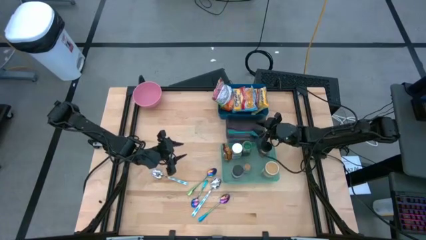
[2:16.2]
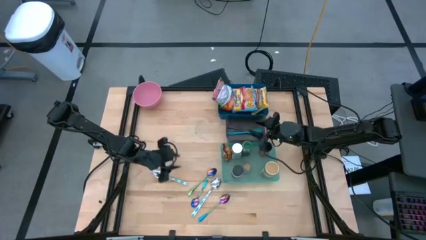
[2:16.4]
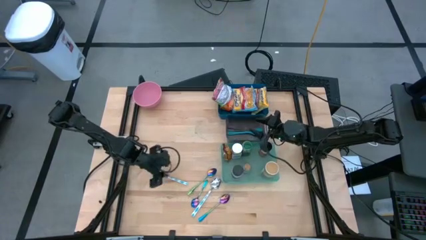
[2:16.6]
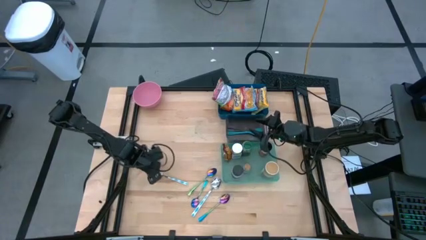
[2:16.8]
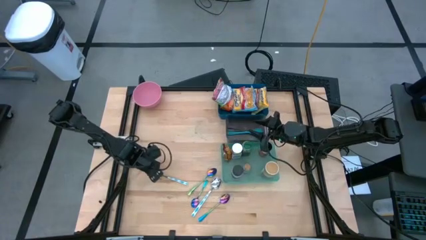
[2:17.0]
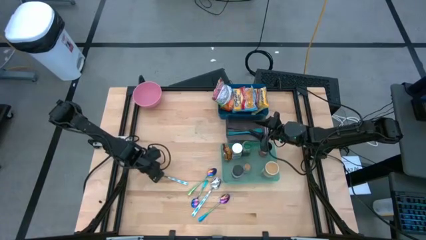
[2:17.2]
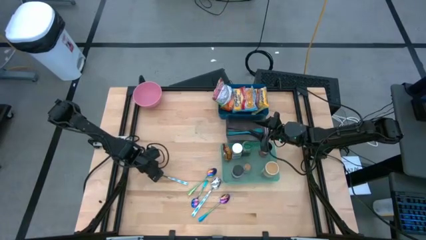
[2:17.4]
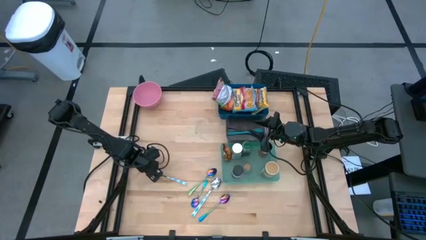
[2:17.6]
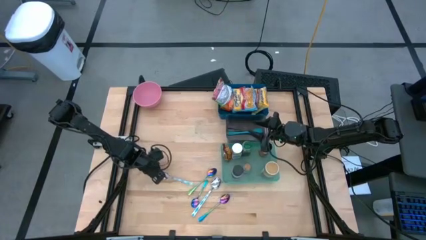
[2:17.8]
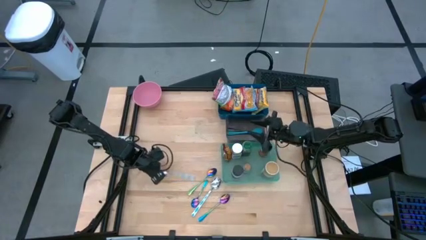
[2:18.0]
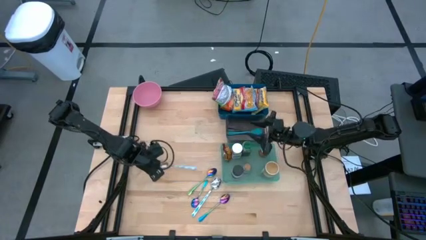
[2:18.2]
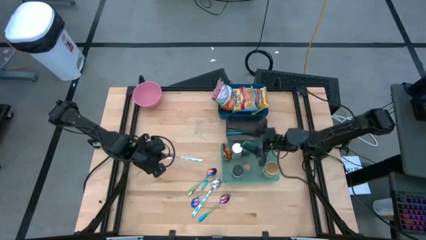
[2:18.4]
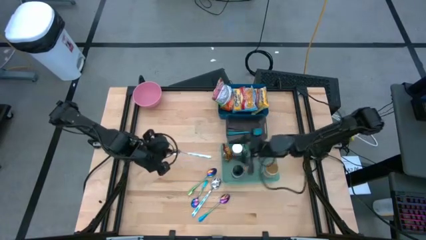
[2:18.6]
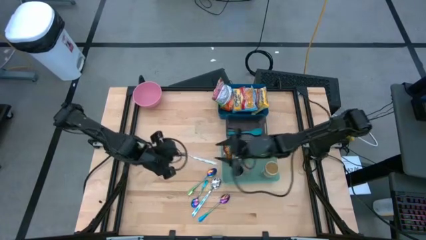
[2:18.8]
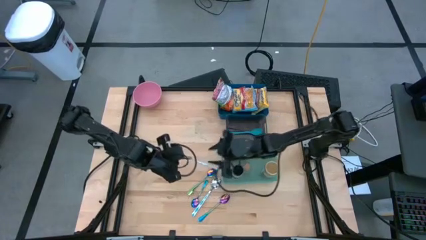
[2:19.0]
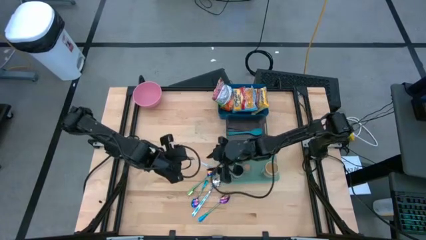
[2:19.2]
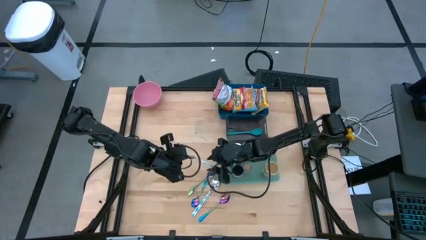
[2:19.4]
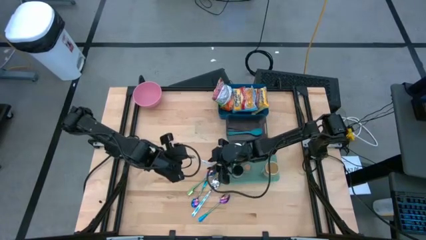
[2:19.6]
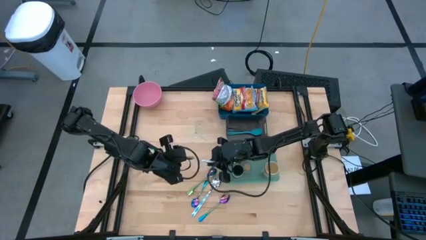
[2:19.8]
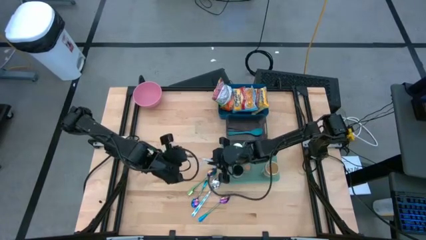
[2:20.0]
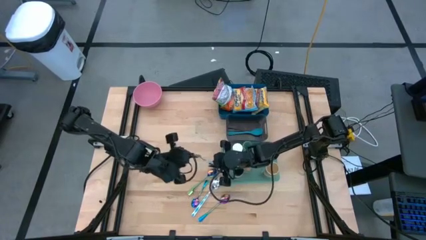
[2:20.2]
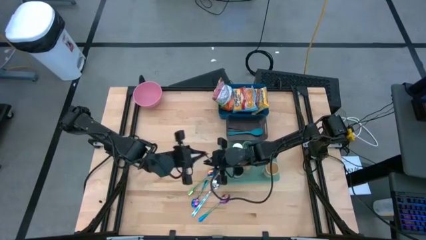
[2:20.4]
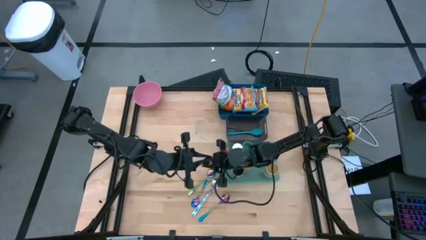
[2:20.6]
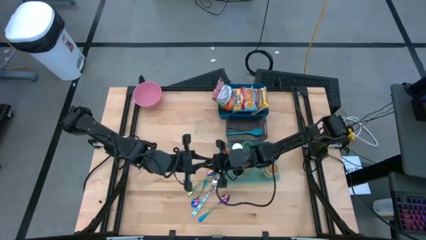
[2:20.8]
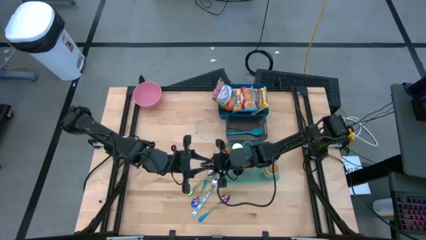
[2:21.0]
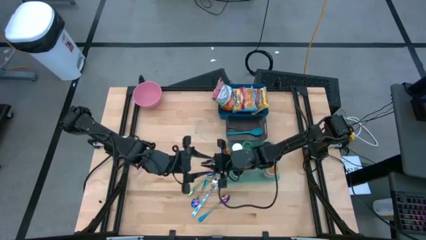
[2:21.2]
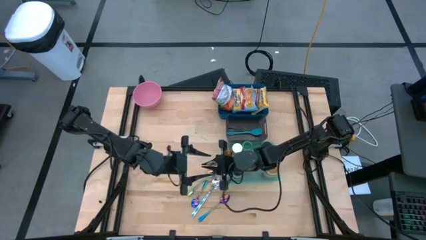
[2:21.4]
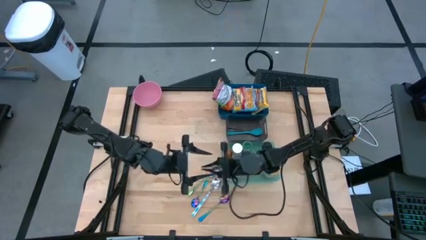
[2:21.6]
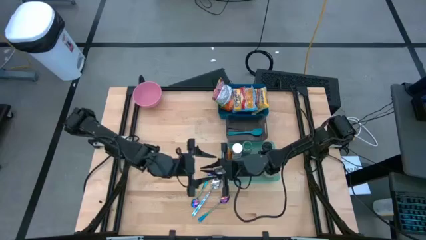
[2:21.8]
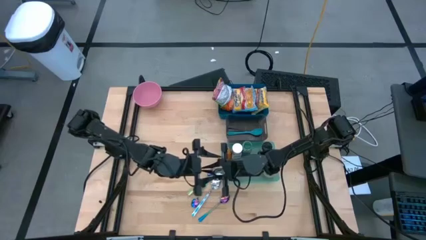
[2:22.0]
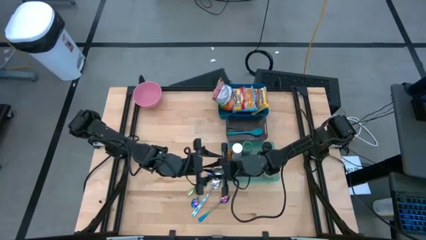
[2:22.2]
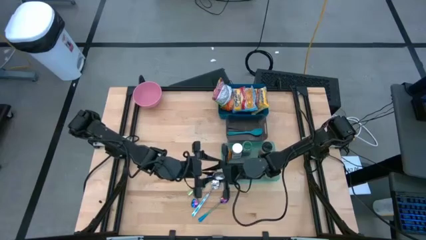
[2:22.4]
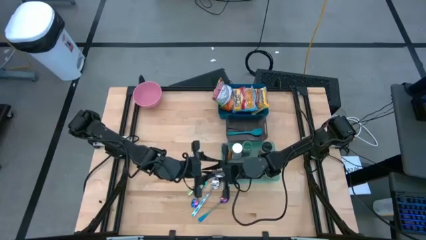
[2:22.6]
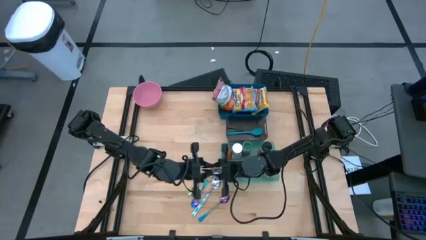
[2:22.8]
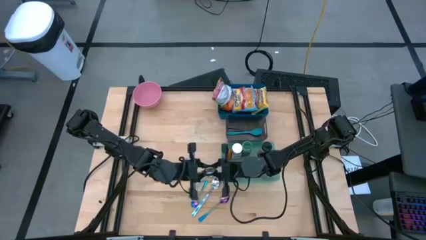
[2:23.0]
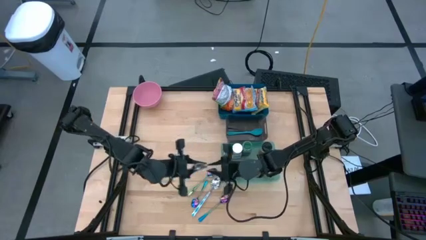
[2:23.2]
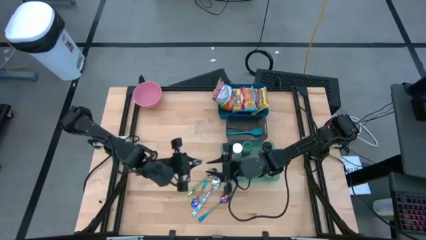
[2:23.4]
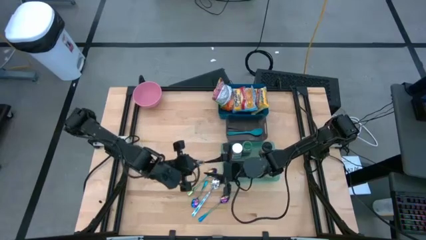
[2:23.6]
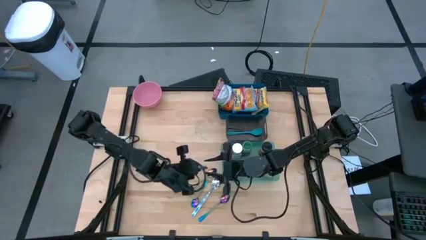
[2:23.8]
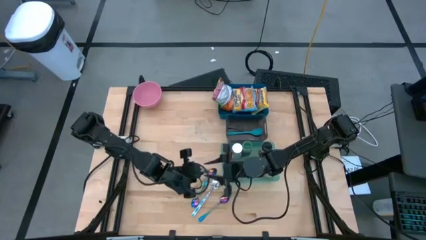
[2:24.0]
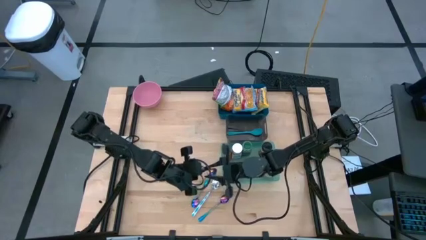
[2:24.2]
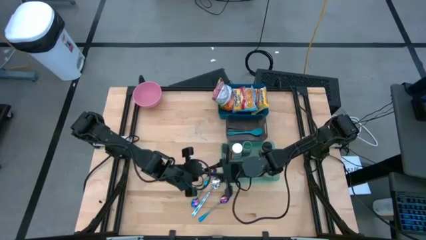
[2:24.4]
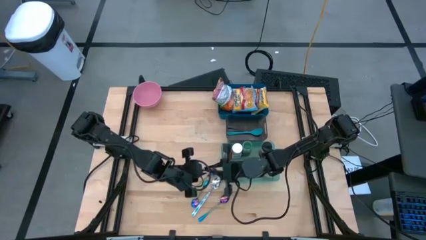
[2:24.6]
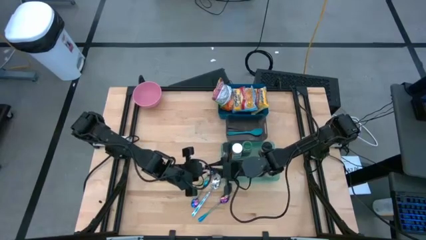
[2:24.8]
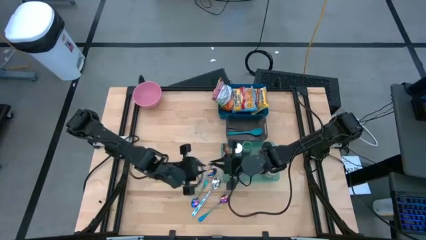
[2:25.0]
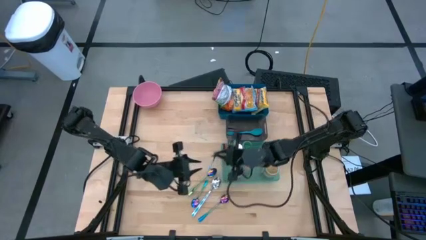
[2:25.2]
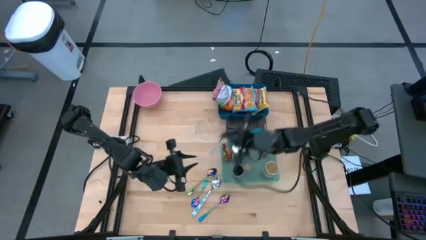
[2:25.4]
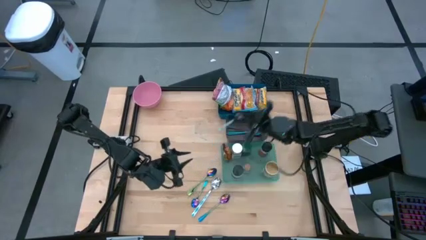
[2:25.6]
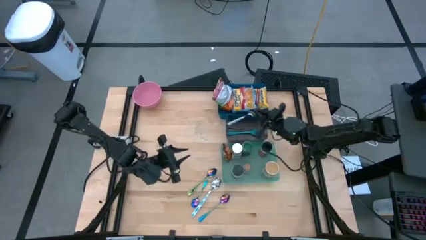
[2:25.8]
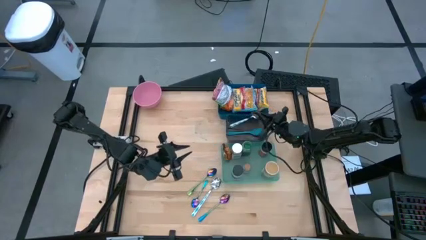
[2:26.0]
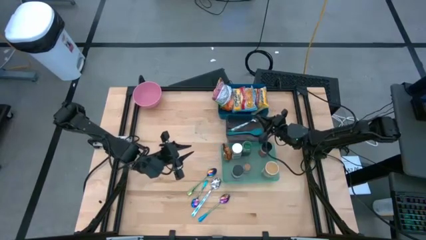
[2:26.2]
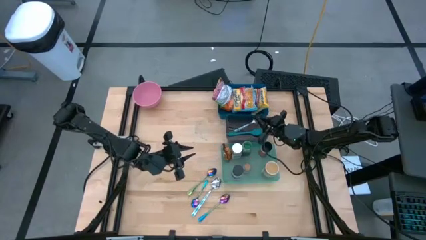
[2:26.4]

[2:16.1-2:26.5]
Task: Pick & Place Food Item
Put the top blue patterned spoon into the black bin

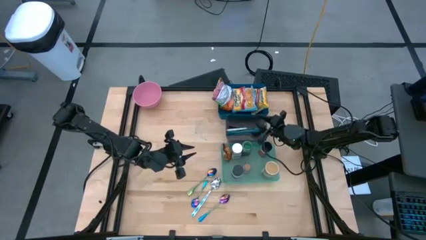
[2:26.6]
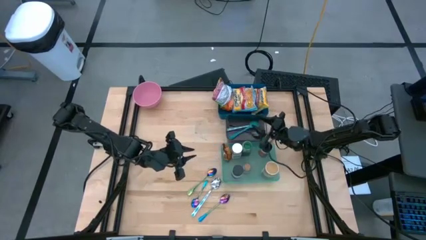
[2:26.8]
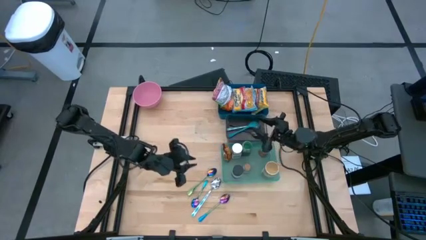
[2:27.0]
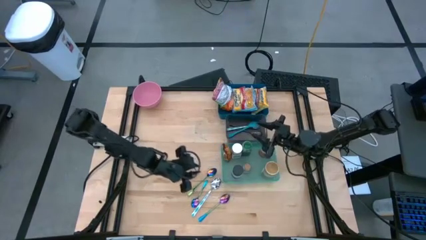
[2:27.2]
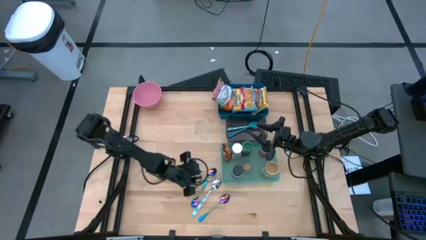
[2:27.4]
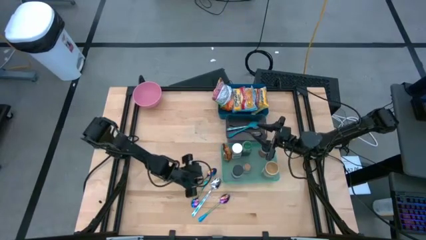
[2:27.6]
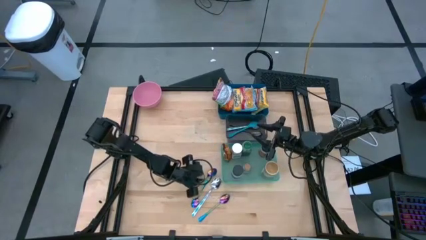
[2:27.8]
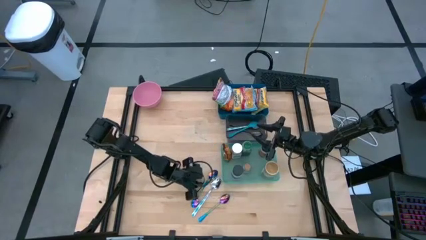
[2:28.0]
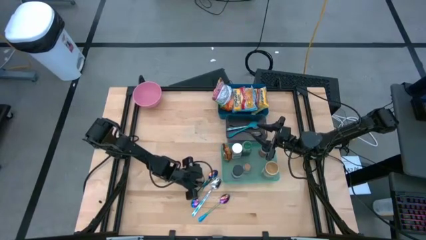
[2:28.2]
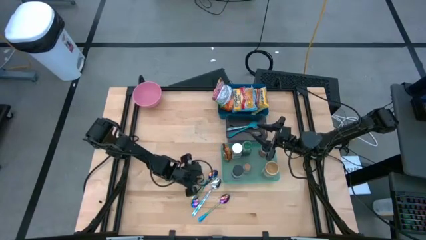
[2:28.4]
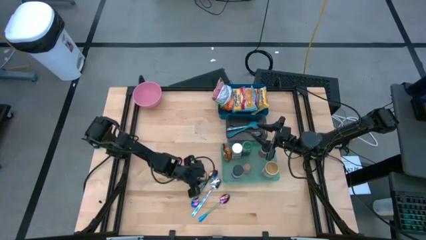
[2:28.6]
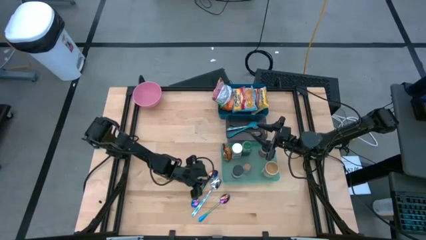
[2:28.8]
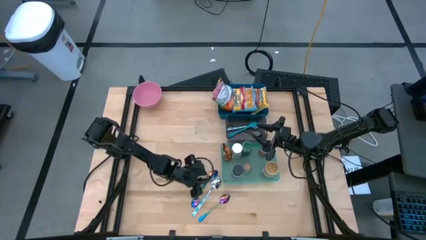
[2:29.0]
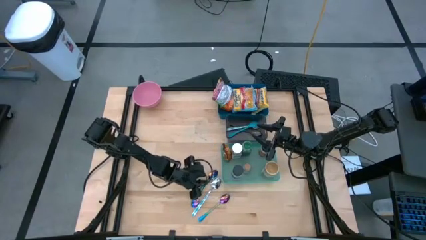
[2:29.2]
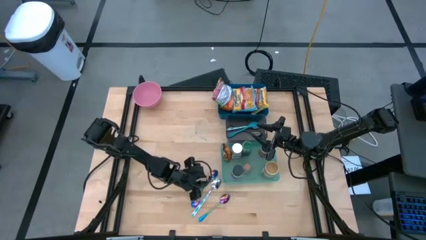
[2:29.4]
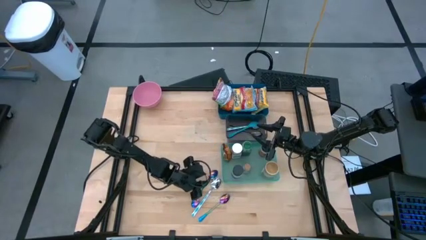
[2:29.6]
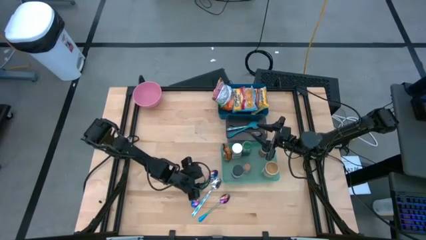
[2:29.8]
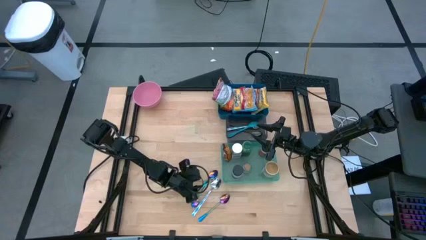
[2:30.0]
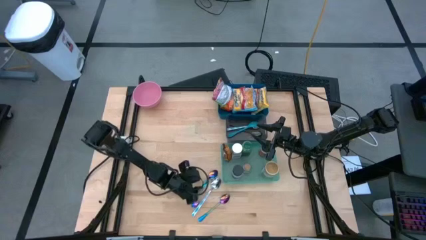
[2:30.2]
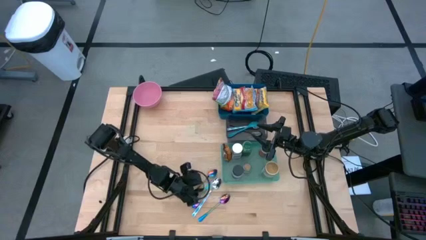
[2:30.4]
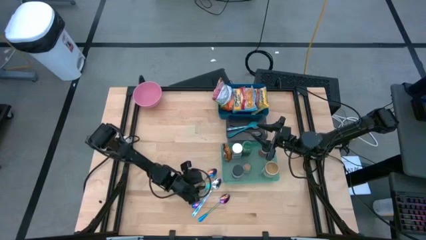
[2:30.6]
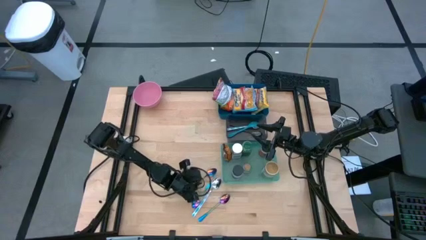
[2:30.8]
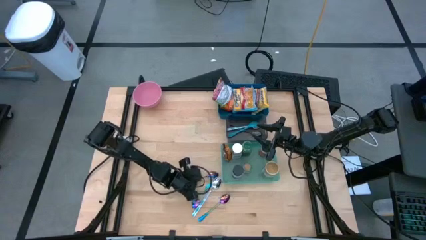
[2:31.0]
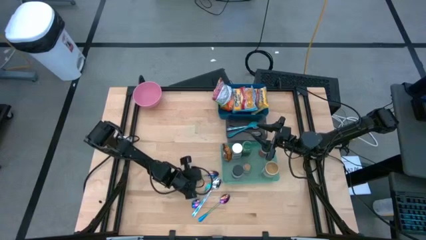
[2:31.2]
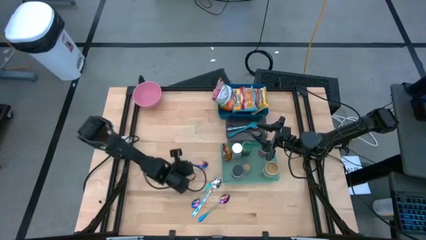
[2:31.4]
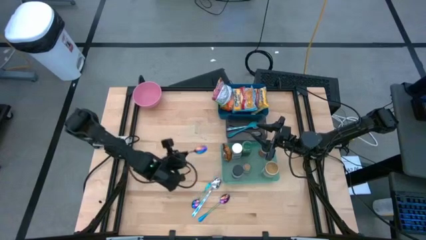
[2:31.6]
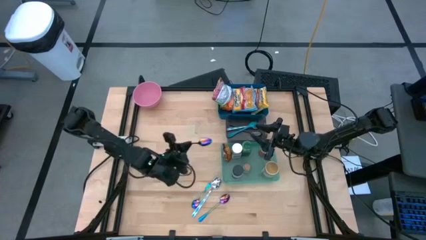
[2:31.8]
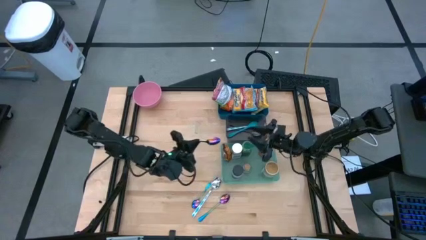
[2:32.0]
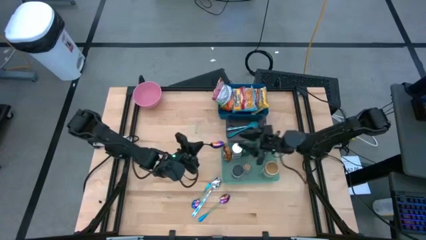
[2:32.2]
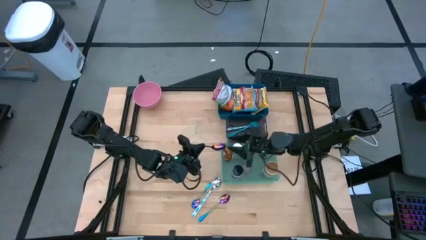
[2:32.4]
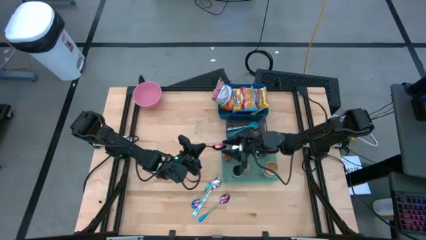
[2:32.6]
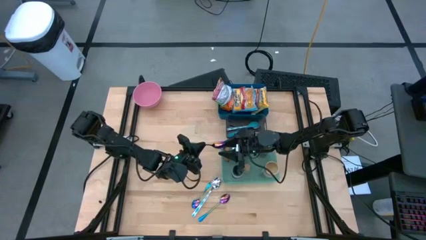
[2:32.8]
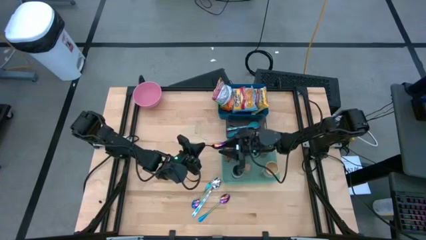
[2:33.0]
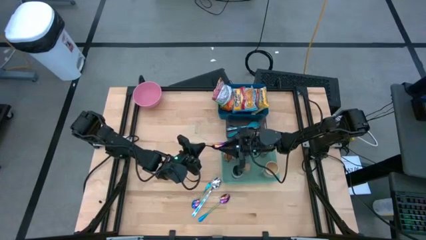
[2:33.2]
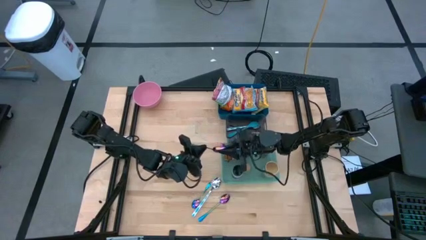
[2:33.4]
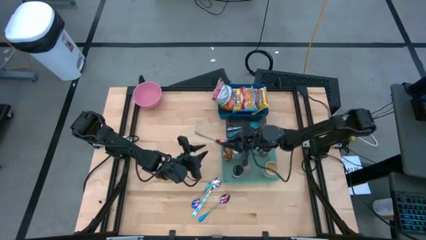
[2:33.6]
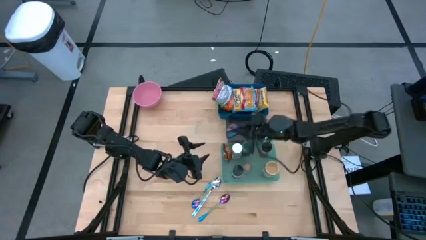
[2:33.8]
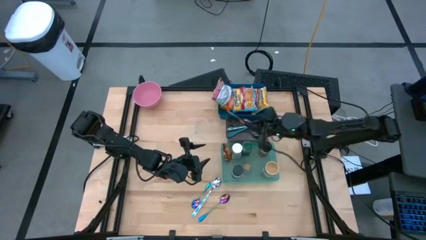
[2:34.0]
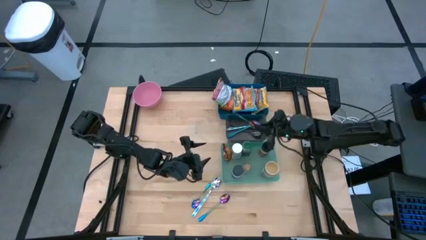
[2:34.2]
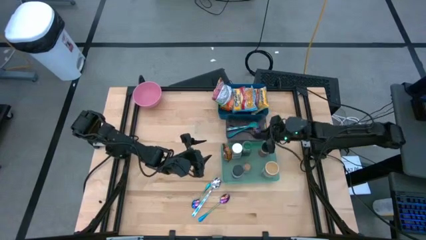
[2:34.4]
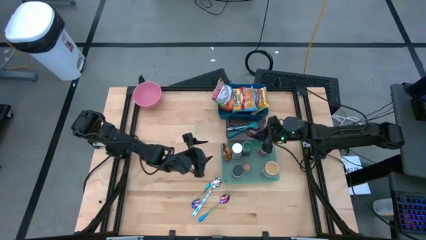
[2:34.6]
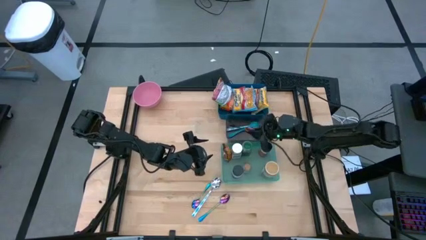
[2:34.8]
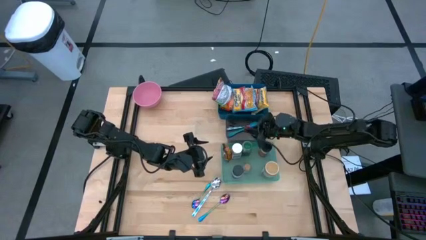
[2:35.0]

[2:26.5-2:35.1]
Put the top purple spoon into the black bin
